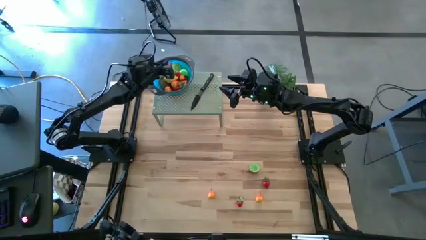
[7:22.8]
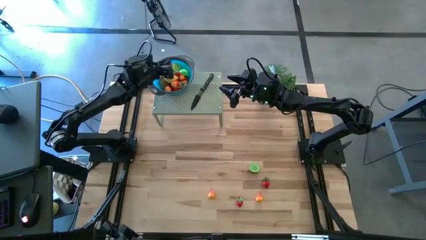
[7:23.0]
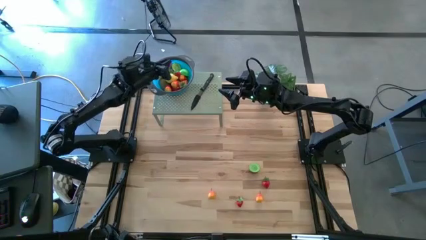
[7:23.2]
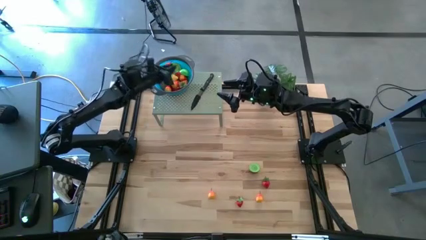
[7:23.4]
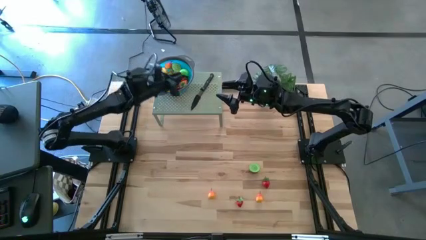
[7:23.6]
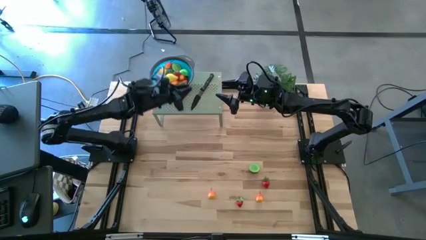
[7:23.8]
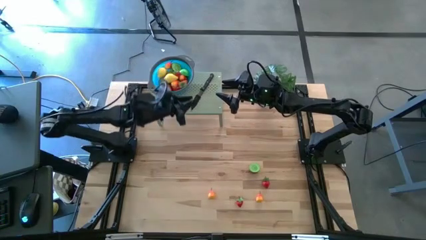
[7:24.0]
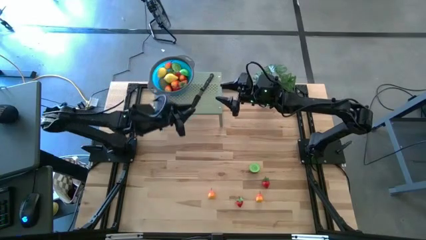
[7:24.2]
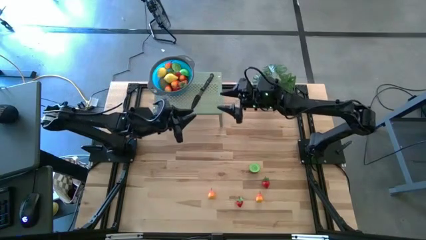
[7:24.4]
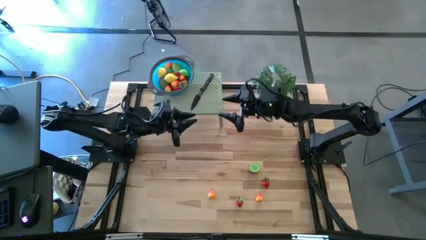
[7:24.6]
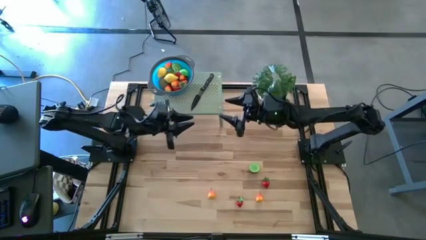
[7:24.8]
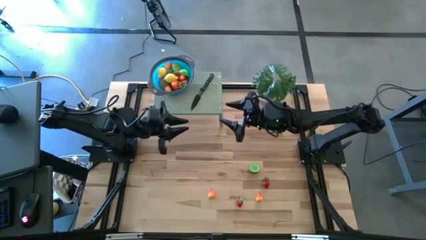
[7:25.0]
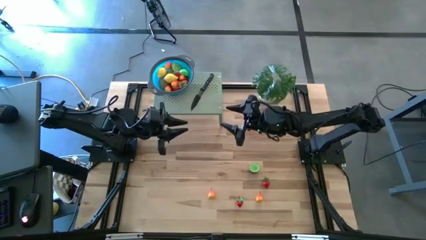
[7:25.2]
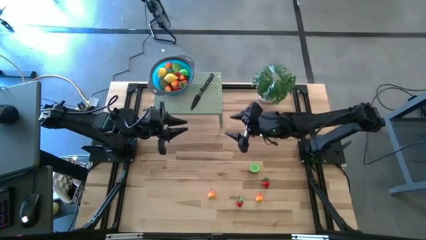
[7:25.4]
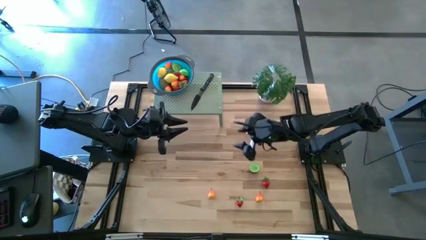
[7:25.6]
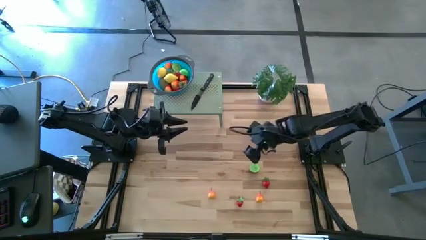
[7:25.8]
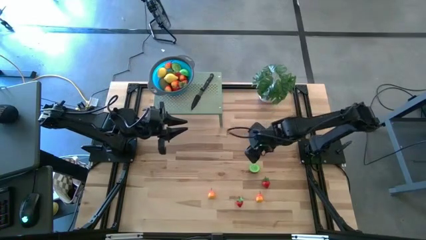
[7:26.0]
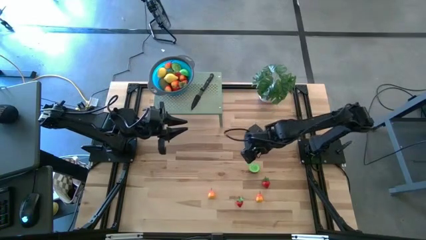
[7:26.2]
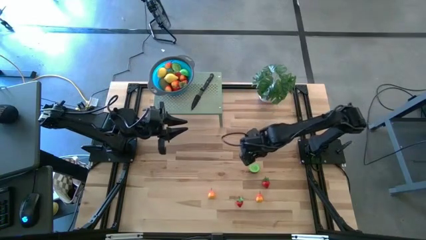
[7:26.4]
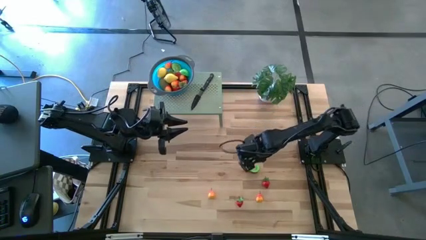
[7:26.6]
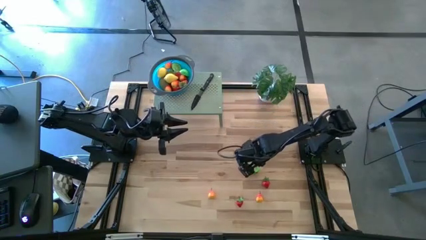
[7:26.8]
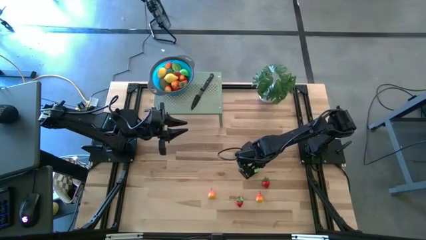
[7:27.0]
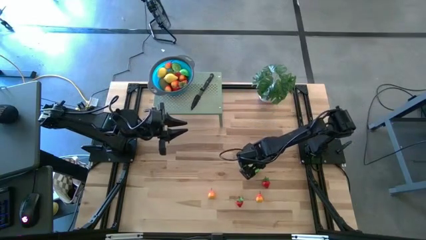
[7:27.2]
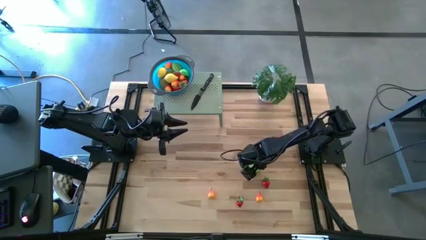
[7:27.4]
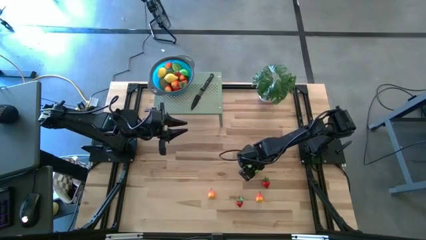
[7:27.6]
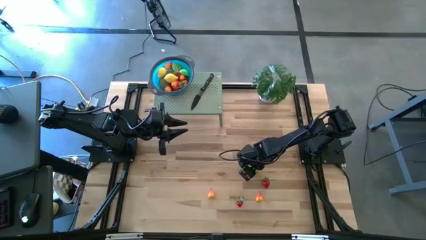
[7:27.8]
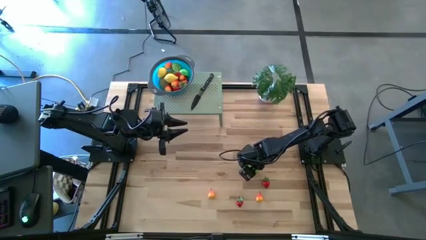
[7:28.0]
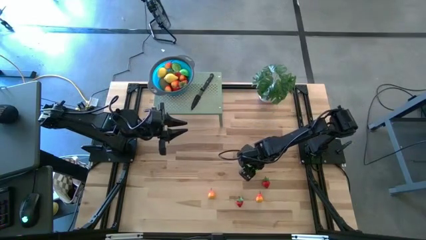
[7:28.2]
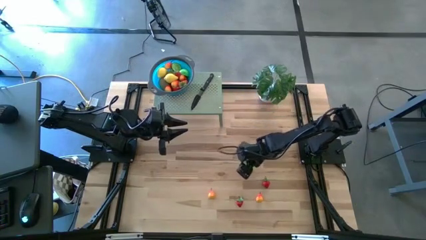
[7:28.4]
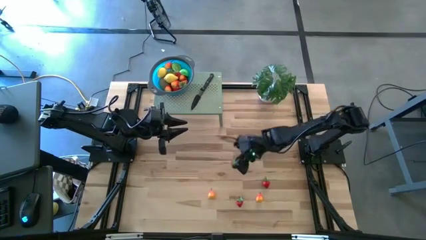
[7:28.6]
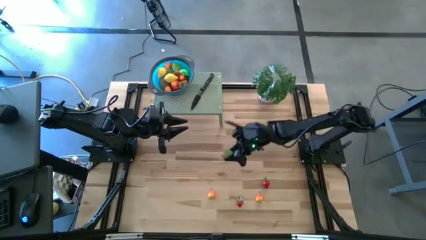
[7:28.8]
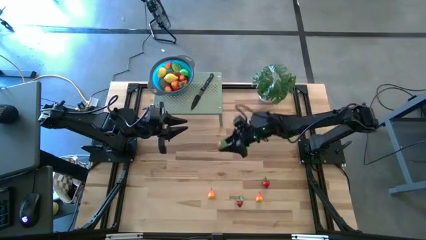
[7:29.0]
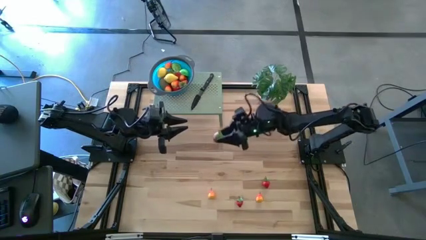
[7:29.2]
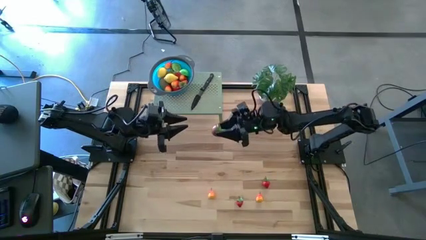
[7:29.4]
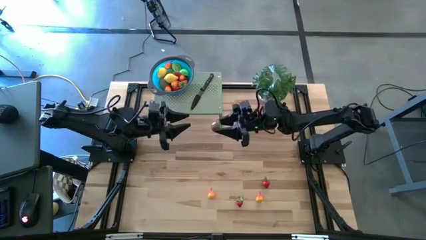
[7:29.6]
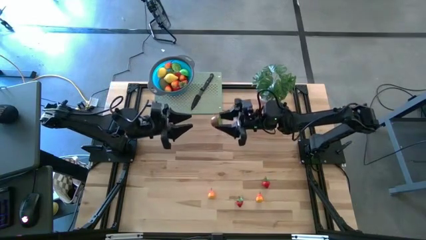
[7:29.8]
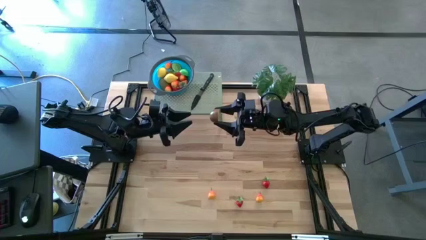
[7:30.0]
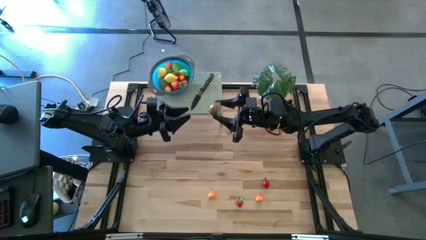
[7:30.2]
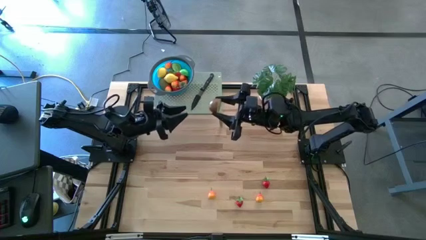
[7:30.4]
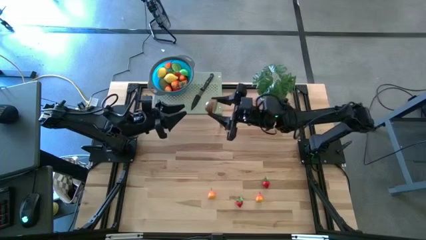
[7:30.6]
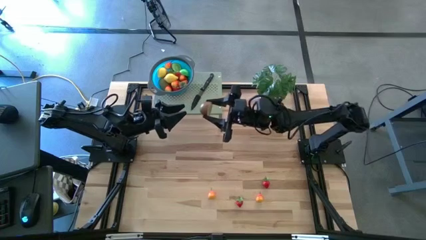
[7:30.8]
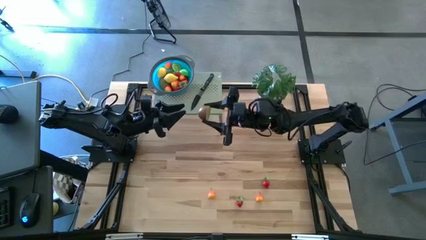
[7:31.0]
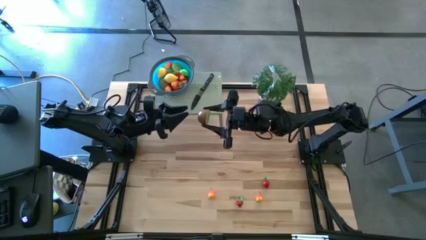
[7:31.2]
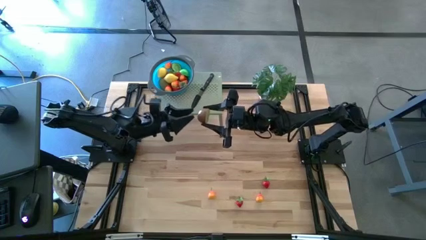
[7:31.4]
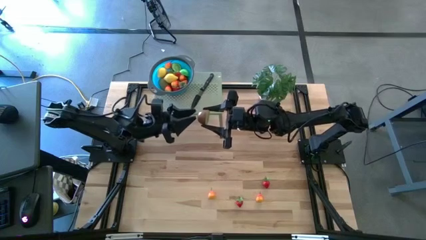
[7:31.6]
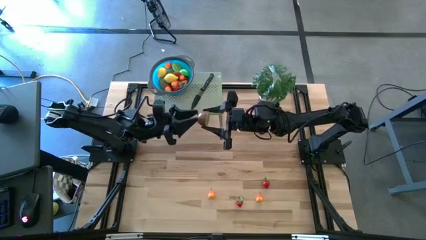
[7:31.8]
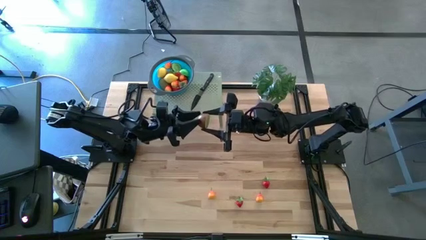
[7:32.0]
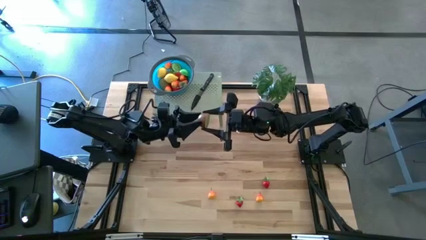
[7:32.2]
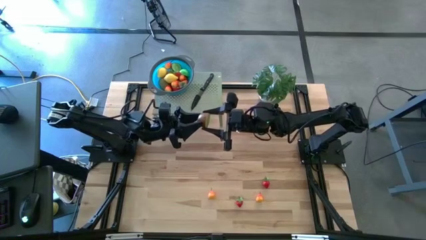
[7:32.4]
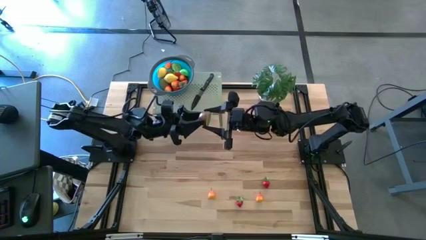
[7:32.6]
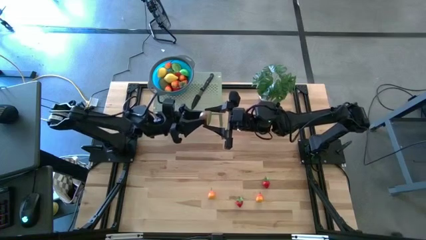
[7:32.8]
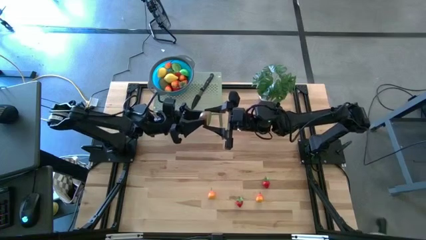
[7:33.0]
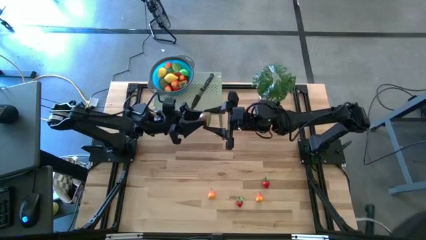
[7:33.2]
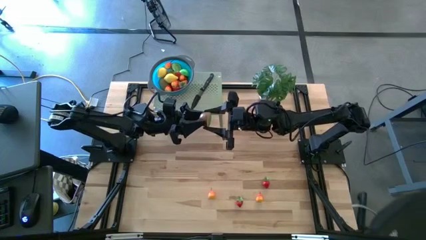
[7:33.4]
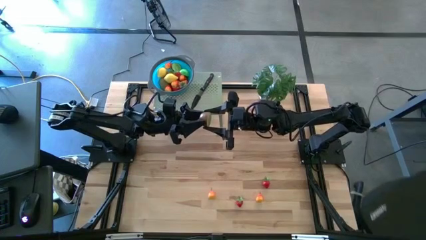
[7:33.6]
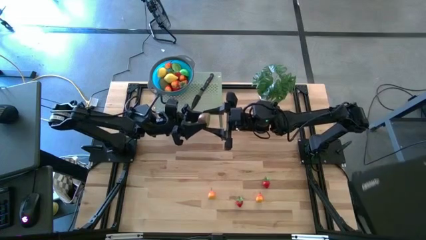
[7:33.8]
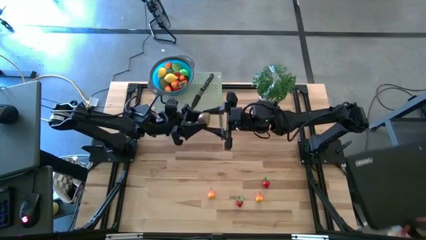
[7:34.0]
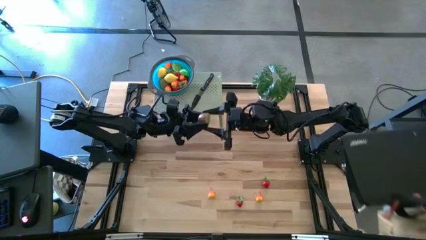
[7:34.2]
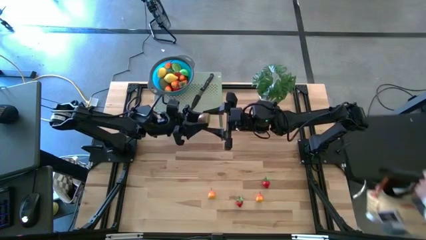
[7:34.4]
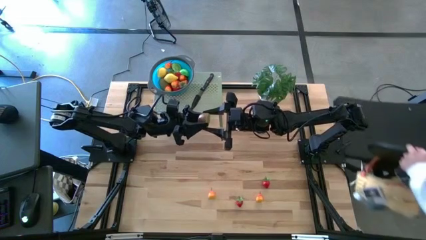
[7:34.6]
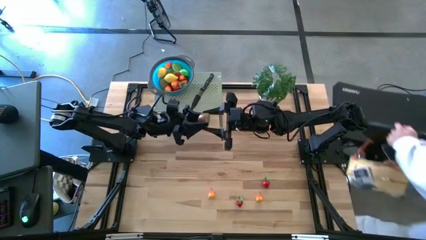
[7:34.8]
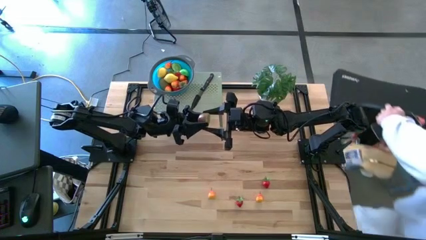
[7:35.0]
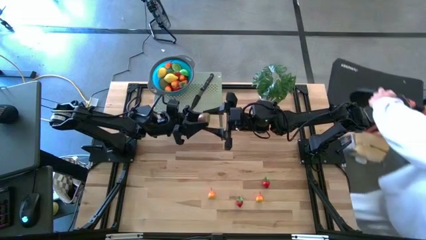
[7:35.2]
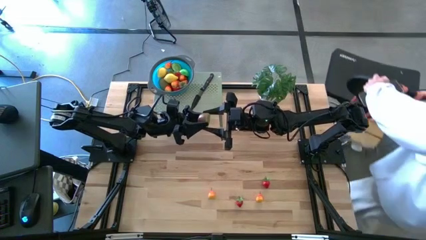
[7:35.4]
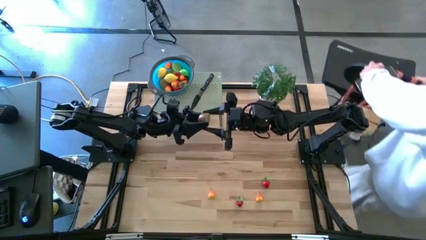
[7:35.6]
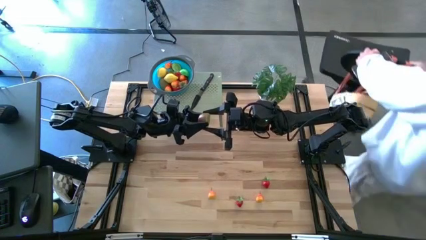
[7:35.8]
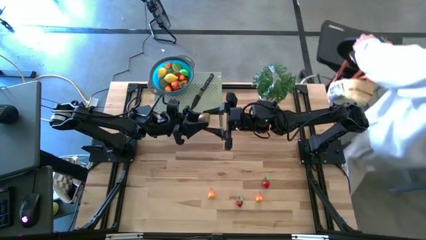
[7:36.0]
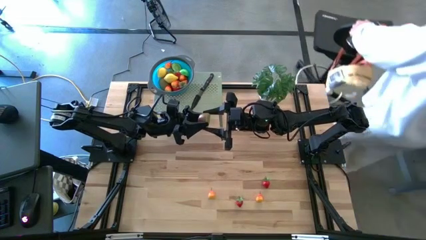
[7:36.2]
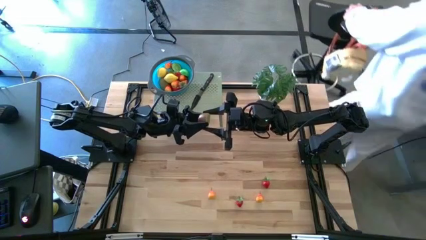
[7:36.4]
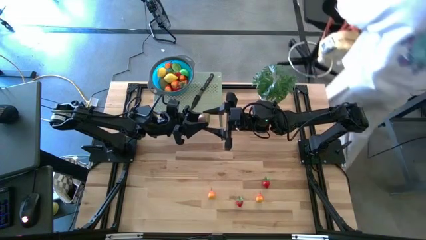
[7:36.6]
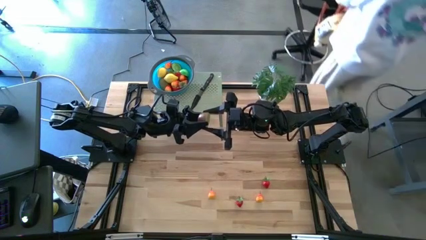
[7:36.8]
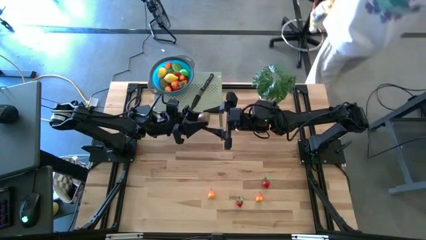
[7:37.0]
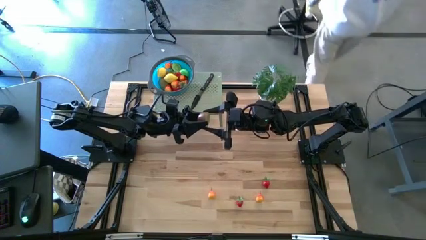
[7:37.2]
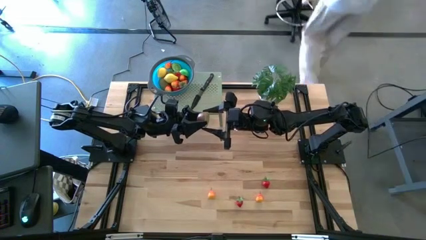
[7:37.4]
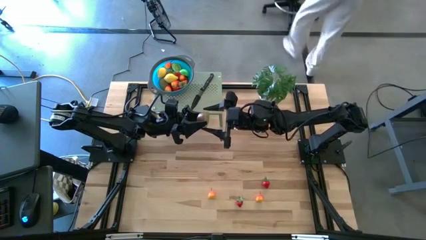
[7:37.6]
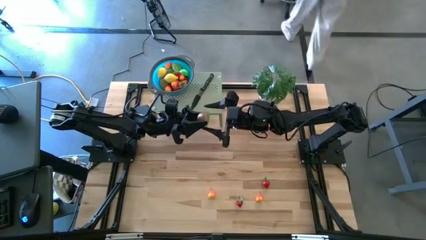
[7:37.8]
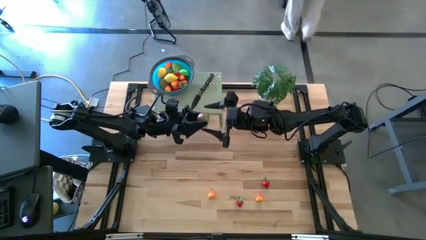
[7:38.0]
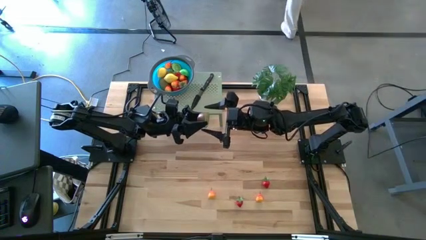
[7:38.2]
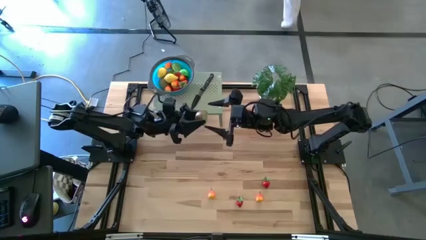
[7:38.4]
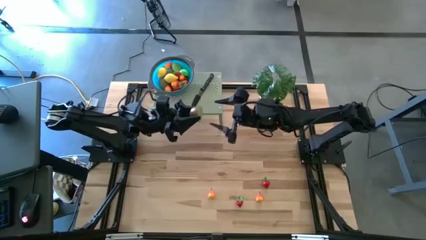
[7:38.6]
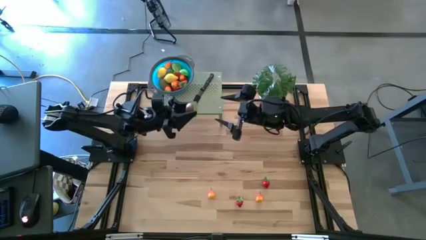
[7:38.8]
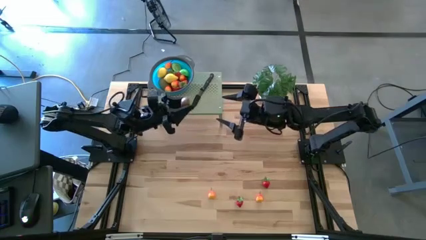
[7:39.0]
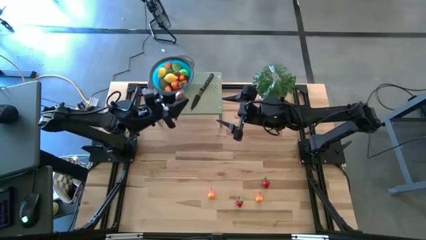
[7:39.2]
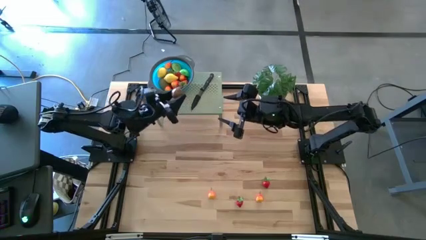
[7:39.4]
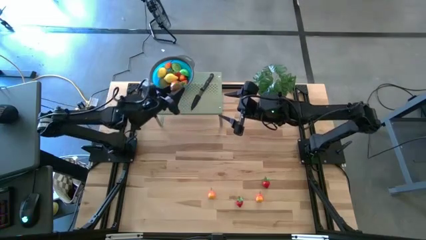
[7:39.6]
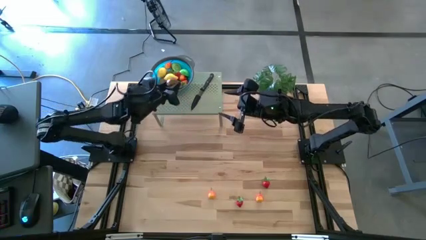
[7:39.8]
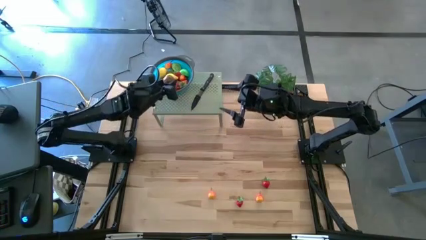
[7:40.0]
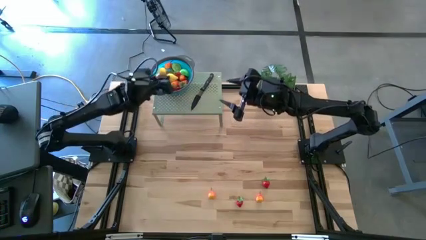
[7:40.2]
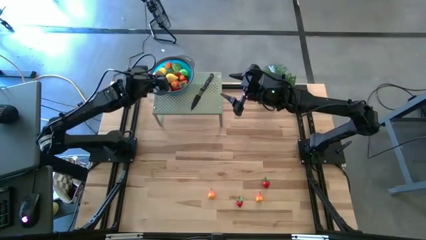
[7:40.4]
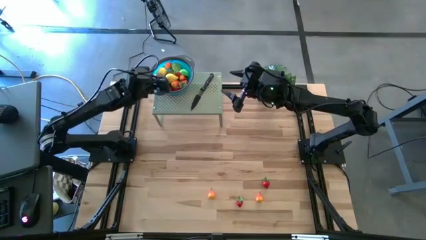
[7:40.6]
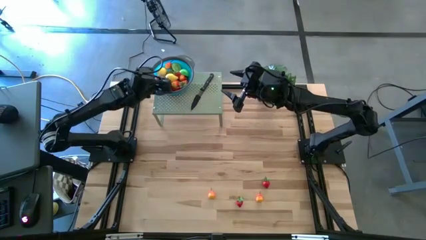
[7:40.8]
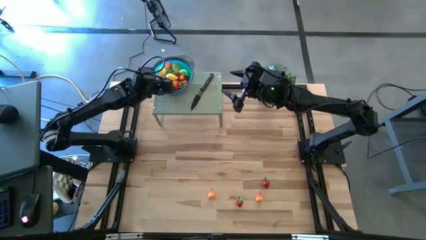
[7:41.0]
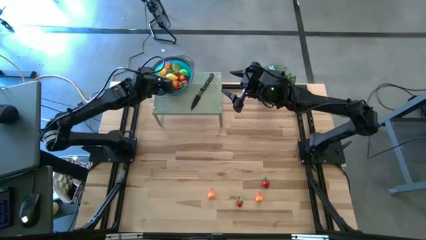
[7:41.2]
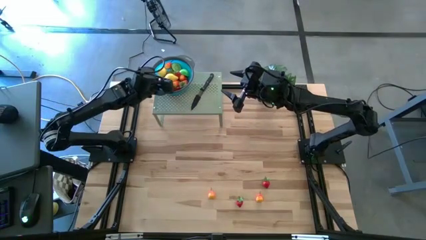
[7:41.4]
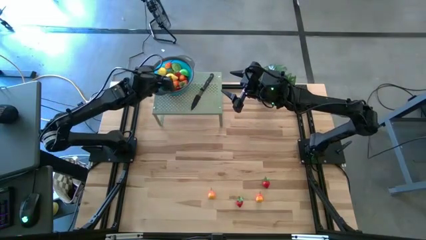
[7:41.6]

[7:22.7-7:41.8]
Task: Pick & Place Fruit
Put the half kiwi into the strainer bowl on the shelf
